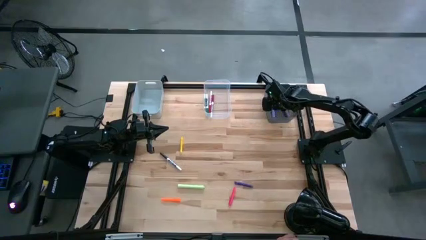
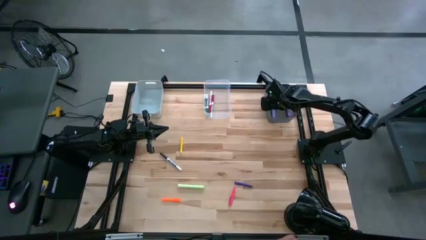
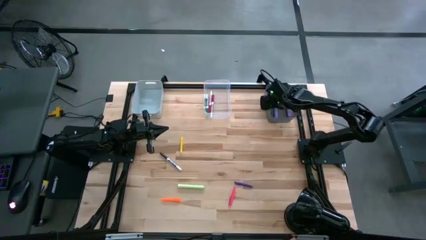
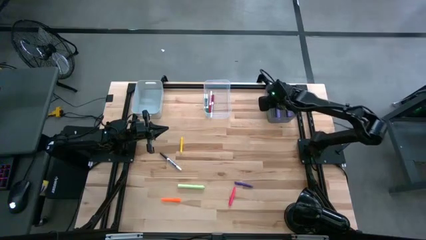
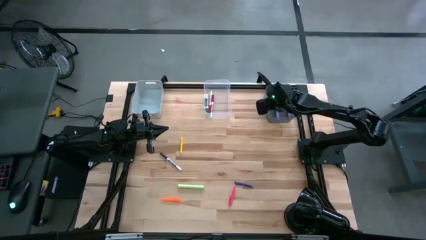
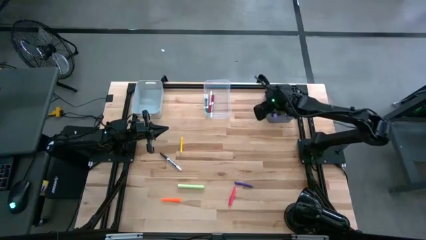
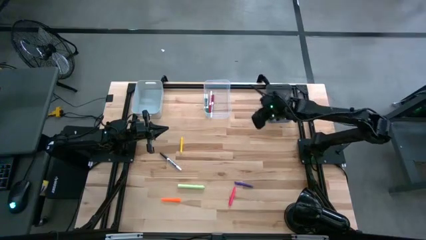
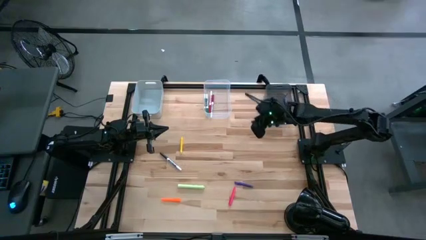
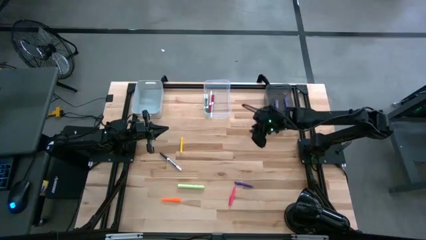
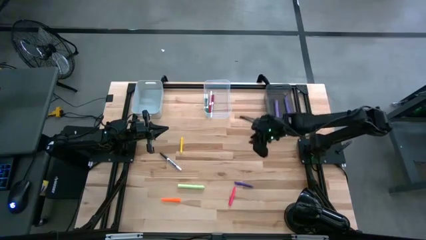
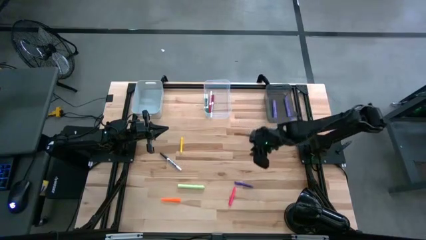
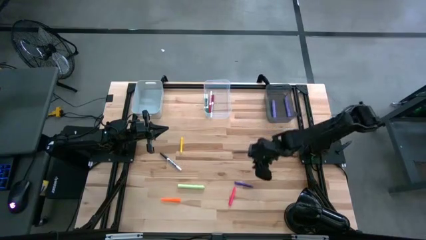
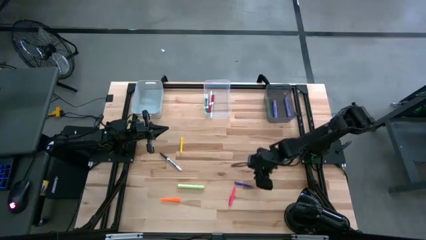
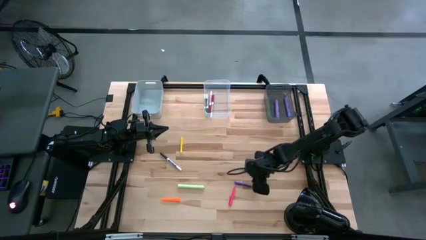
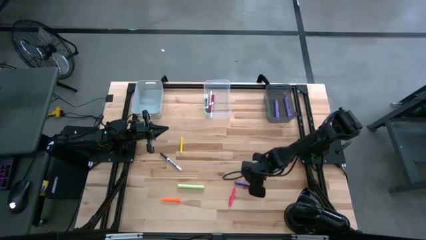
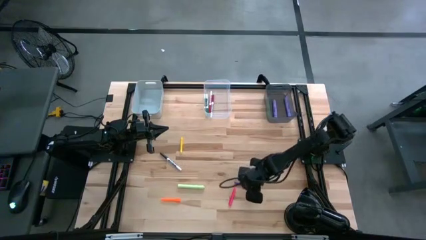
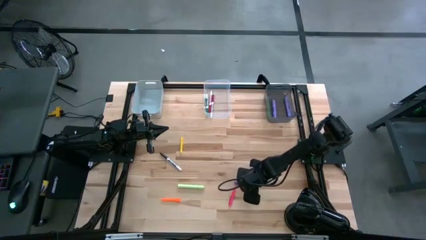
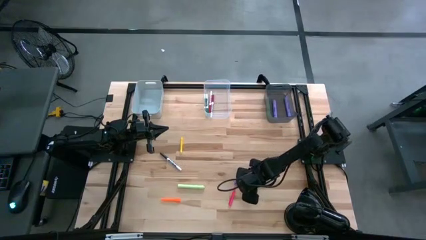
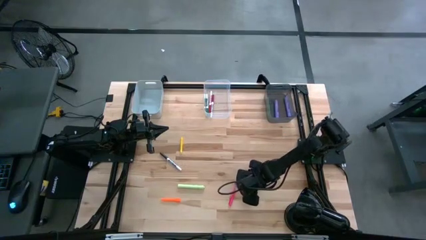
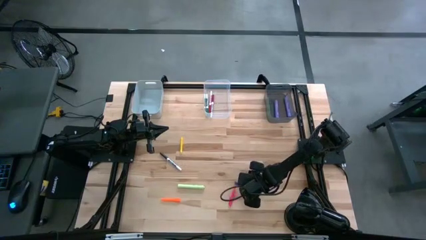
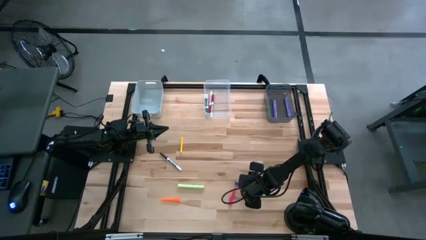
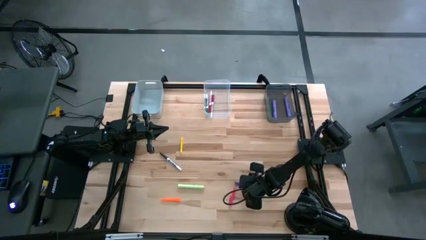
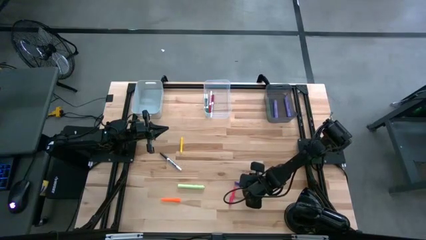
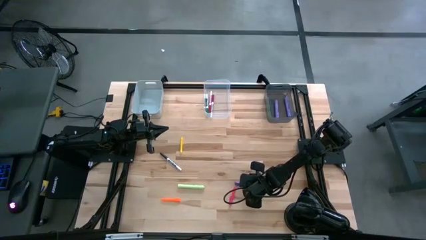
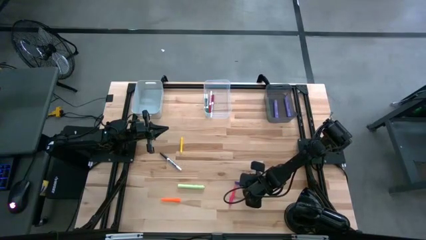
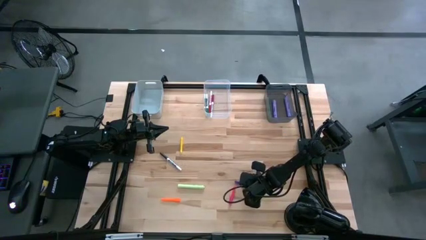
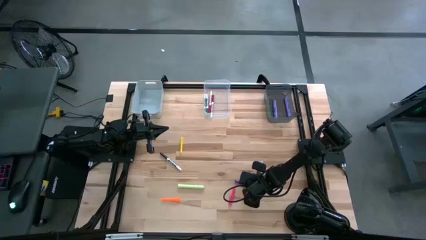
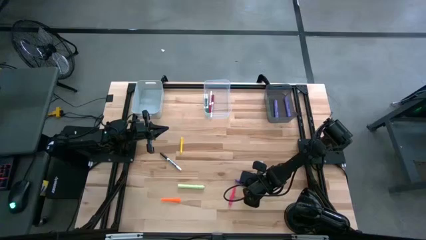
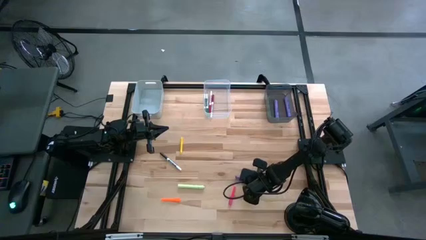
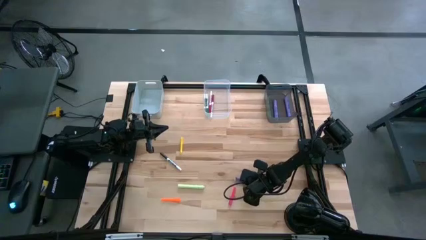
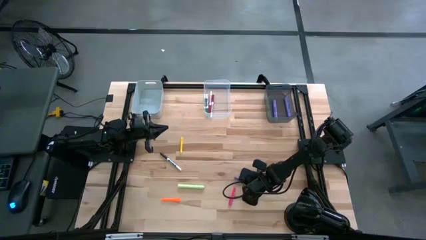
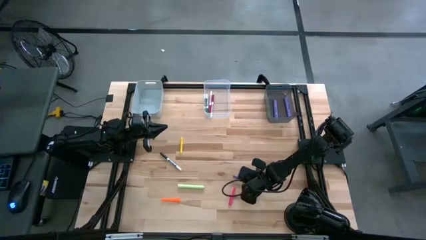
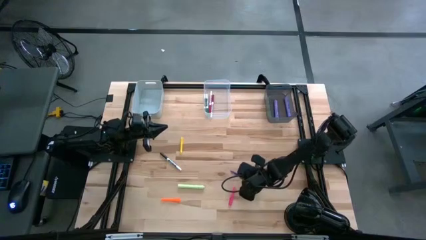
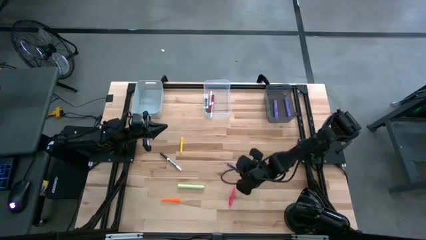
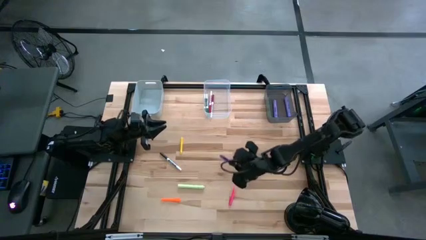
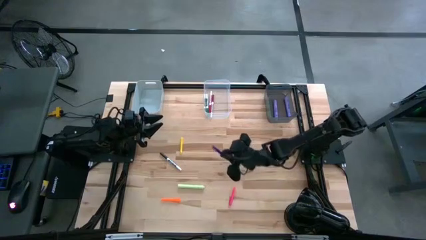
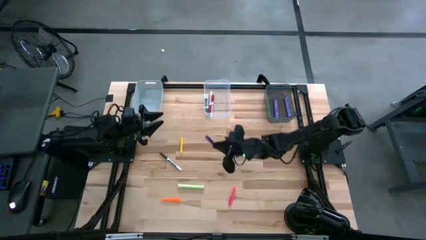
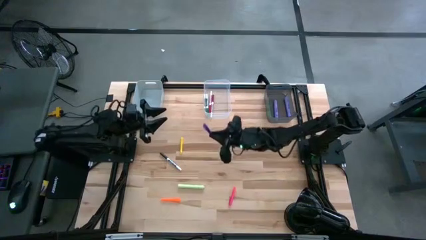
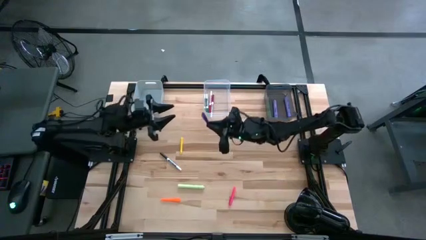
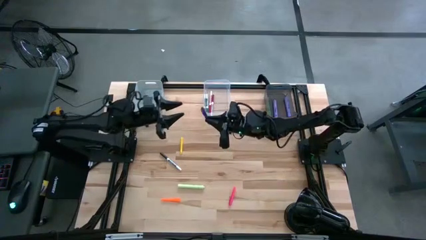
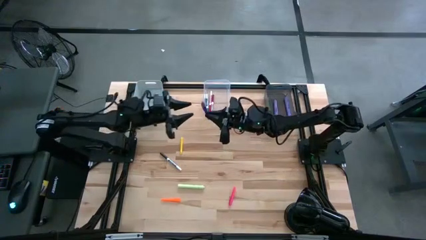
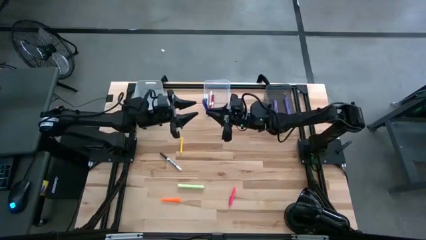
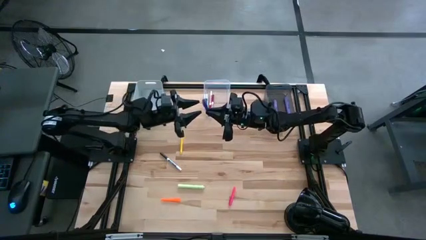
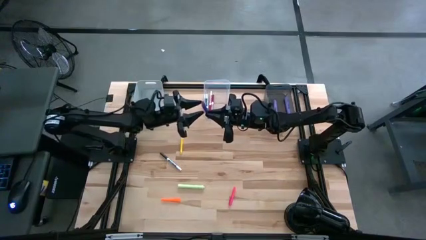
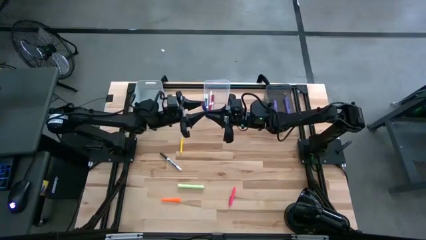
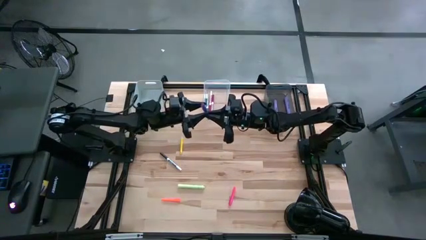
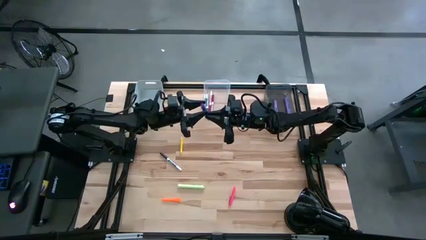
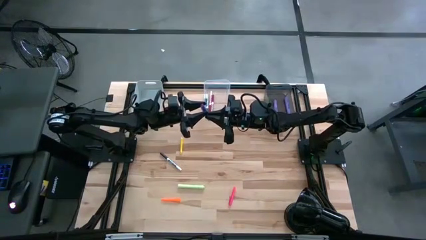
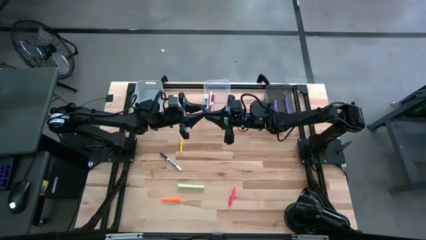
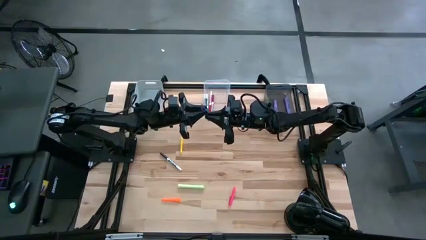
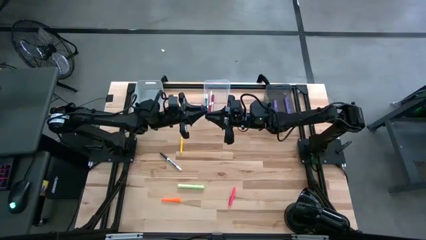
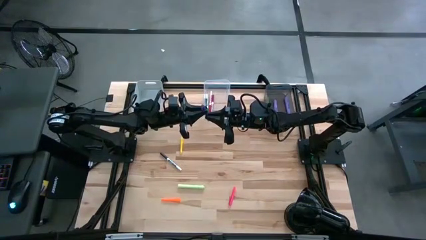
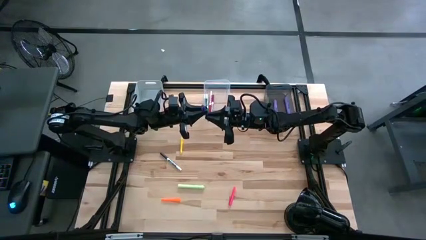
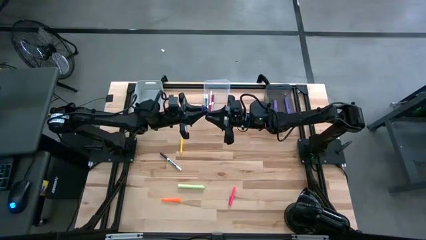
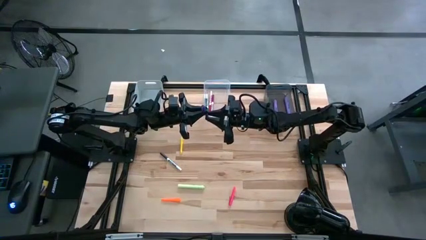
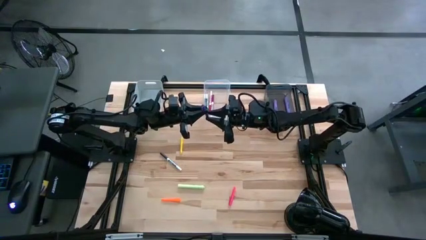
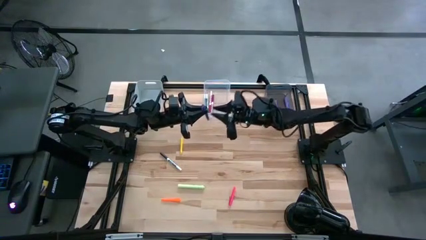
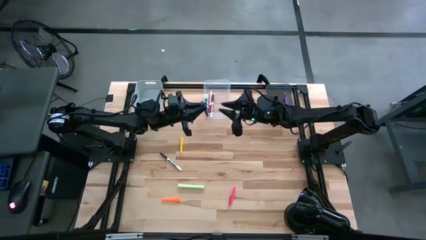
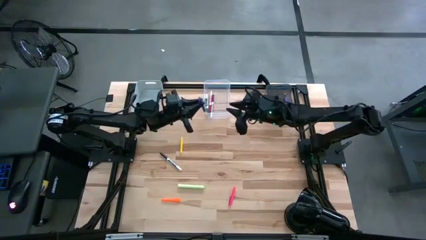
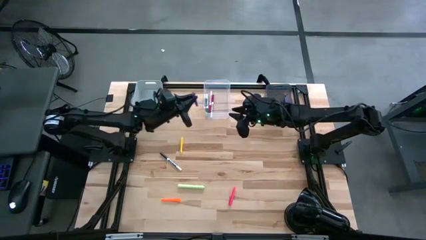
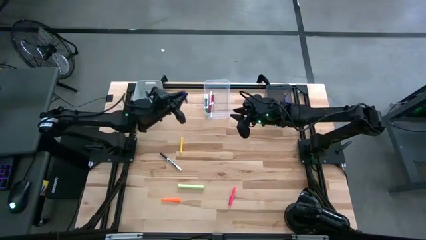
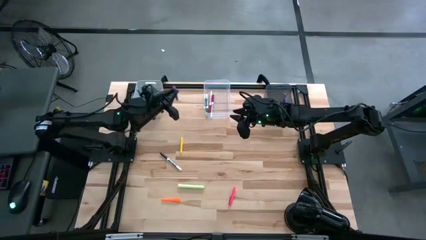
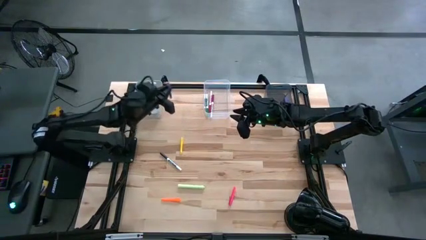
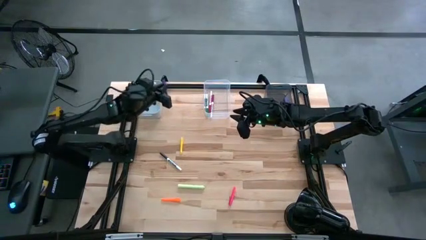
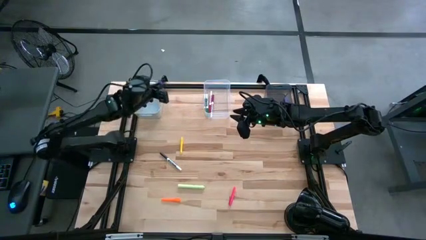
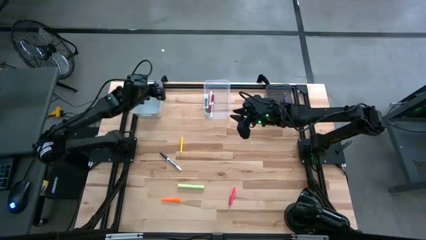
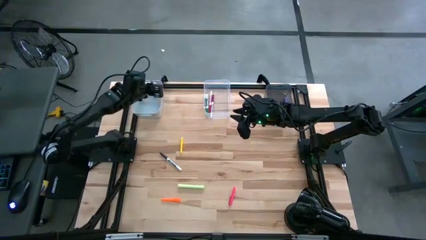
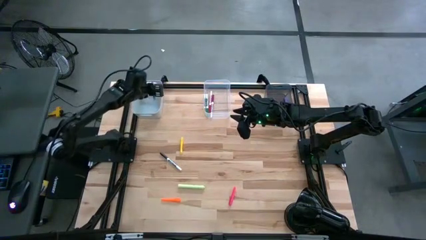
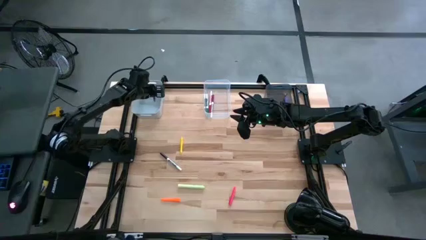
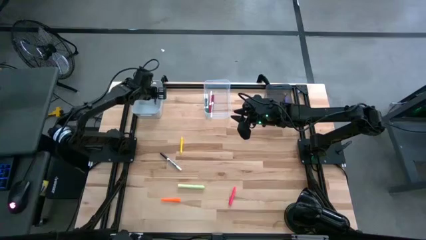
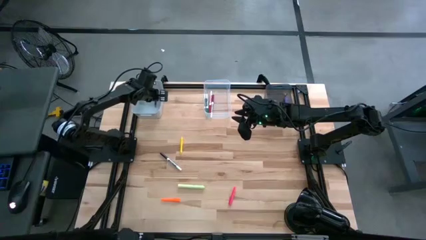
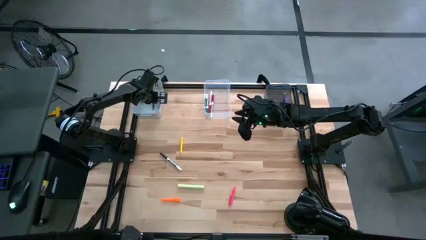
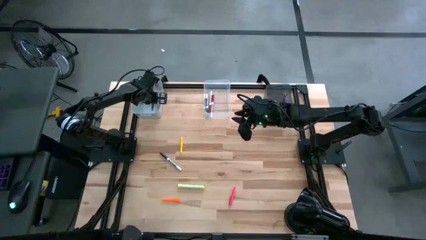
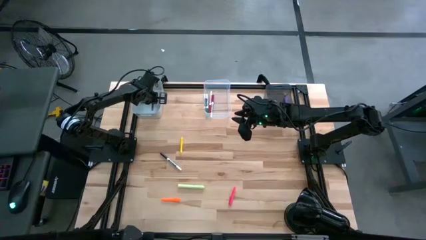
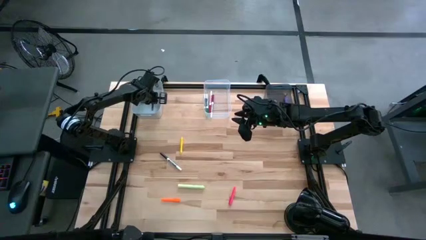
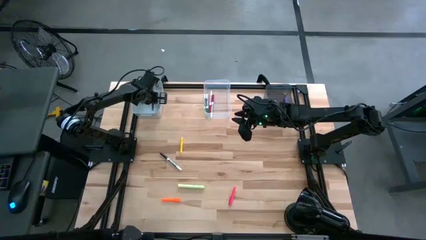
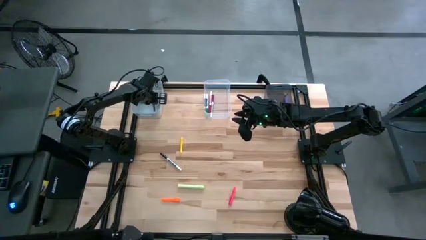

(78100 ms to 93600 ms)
Task: Pick & Place Markers
Put the purple pen into the gray bin
